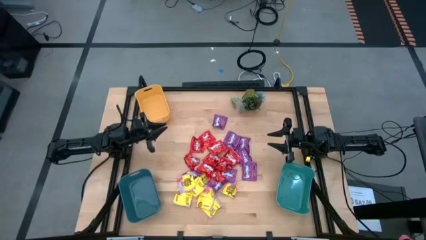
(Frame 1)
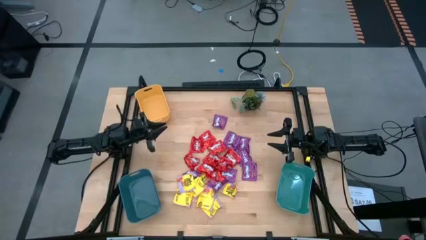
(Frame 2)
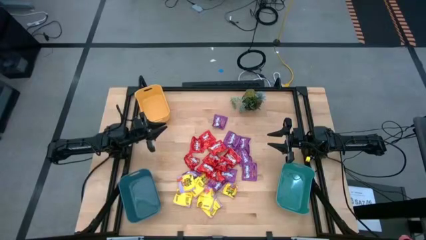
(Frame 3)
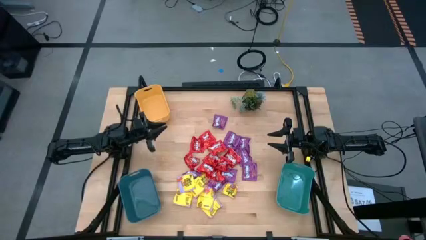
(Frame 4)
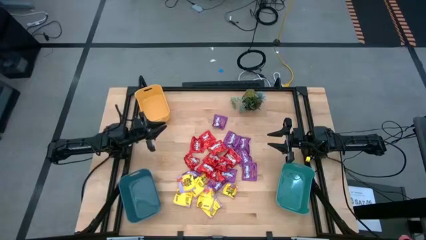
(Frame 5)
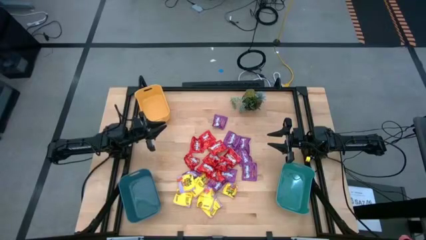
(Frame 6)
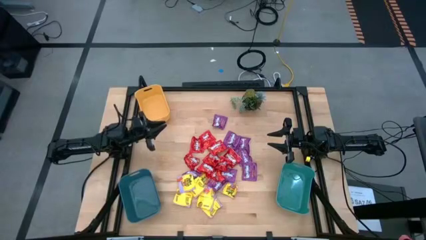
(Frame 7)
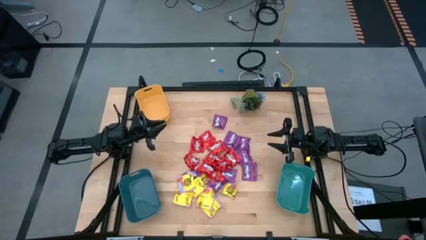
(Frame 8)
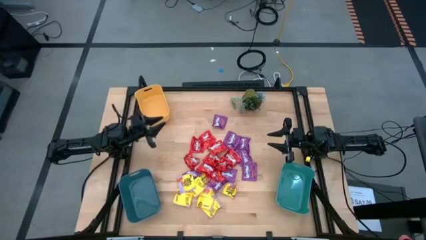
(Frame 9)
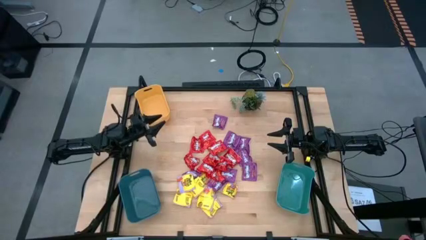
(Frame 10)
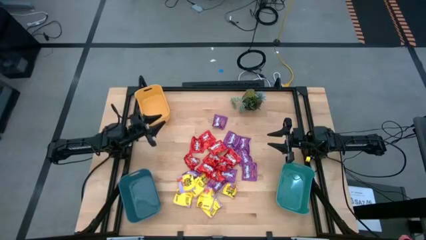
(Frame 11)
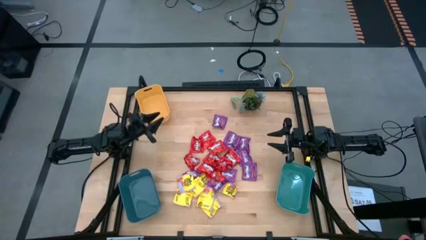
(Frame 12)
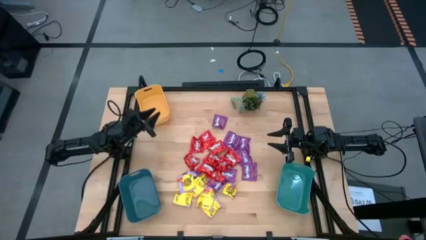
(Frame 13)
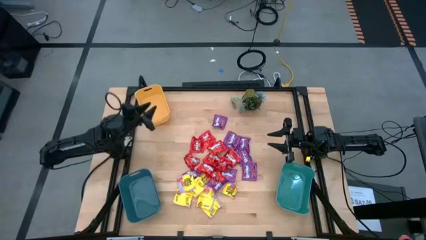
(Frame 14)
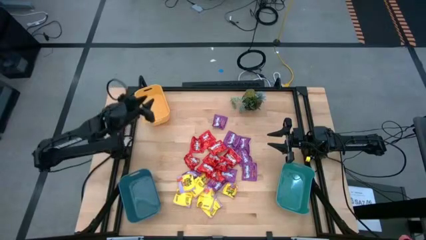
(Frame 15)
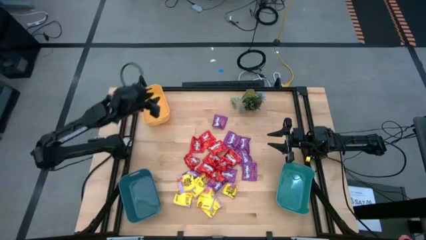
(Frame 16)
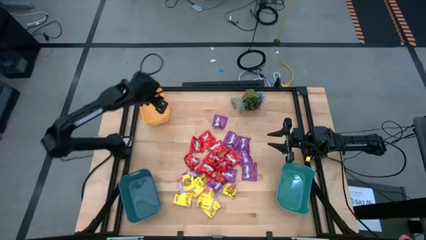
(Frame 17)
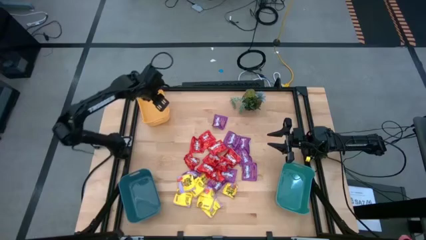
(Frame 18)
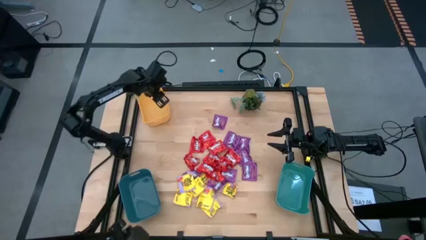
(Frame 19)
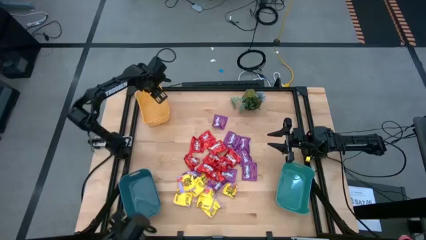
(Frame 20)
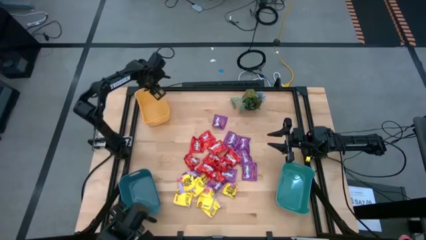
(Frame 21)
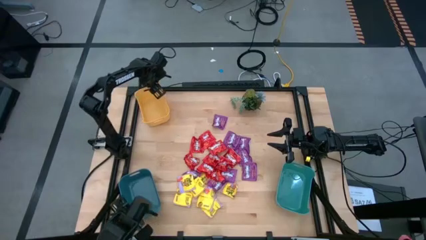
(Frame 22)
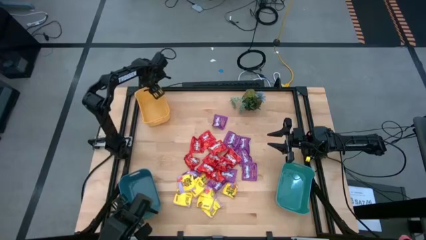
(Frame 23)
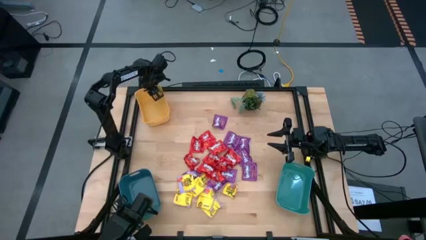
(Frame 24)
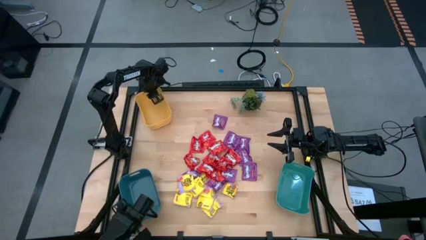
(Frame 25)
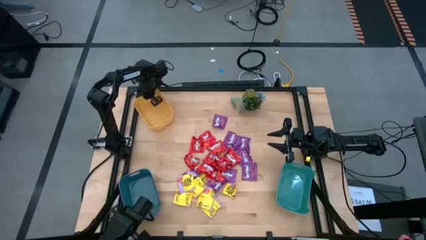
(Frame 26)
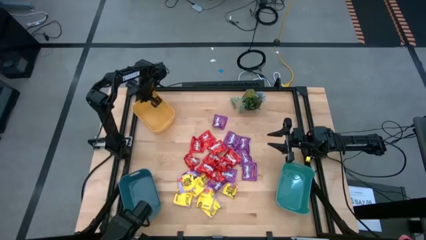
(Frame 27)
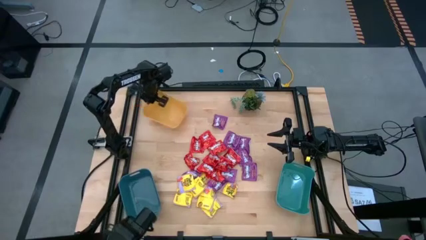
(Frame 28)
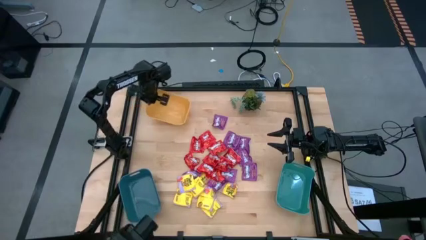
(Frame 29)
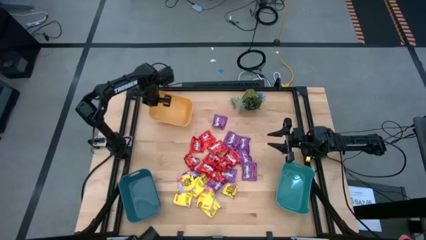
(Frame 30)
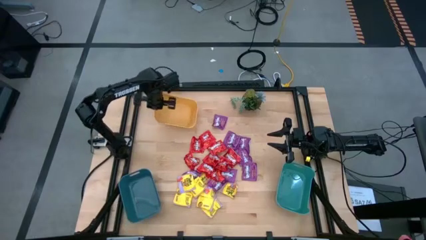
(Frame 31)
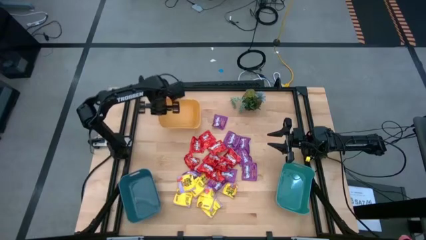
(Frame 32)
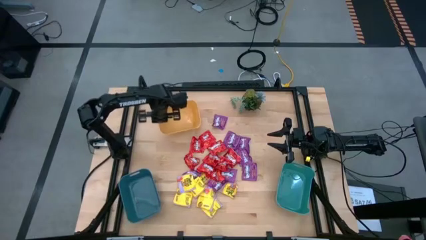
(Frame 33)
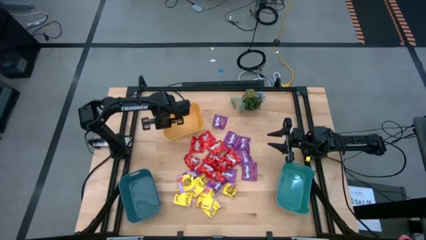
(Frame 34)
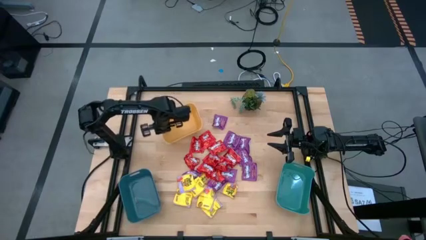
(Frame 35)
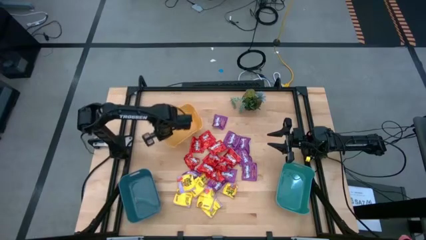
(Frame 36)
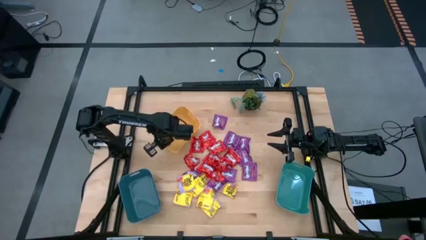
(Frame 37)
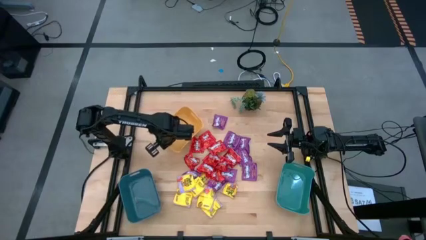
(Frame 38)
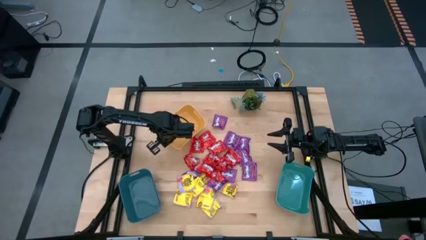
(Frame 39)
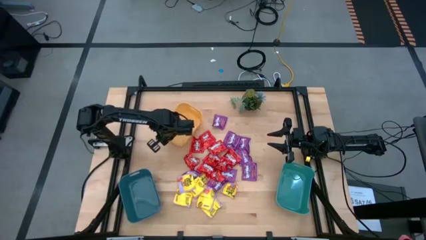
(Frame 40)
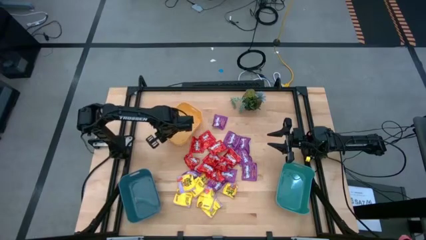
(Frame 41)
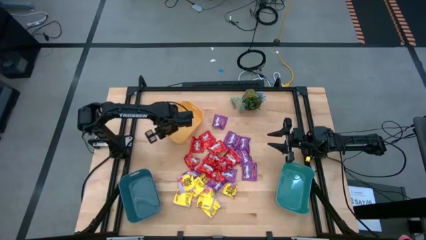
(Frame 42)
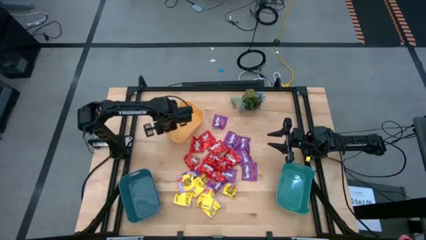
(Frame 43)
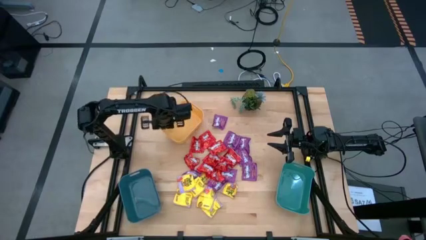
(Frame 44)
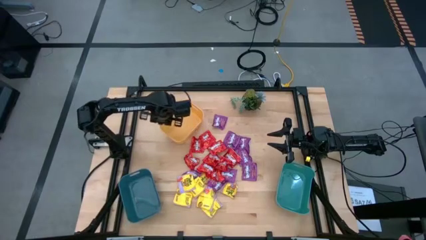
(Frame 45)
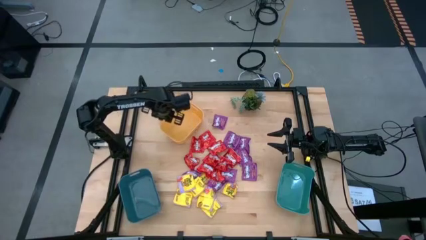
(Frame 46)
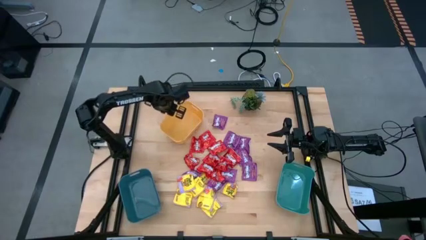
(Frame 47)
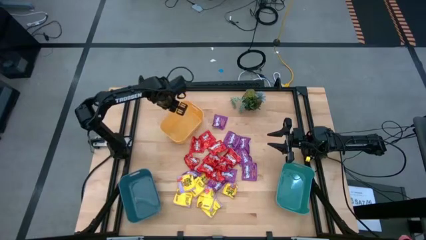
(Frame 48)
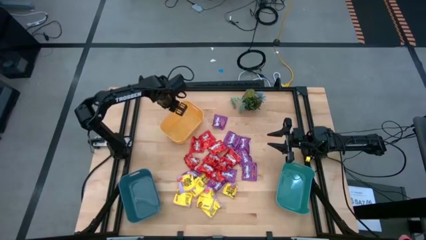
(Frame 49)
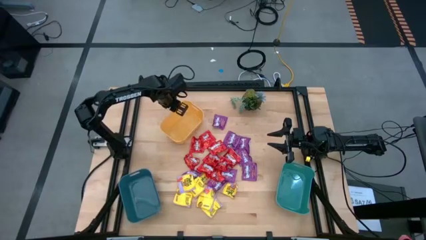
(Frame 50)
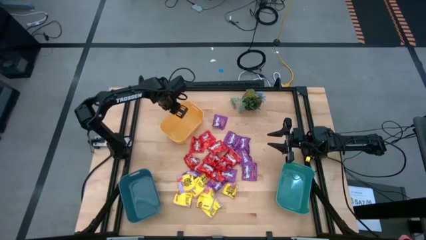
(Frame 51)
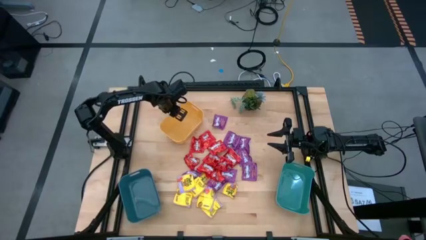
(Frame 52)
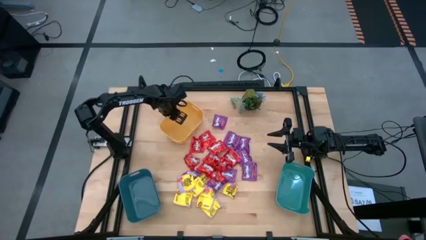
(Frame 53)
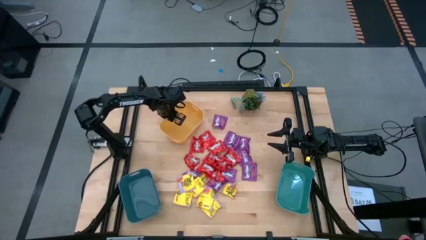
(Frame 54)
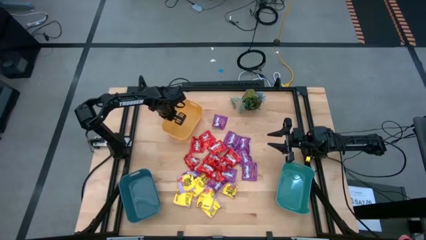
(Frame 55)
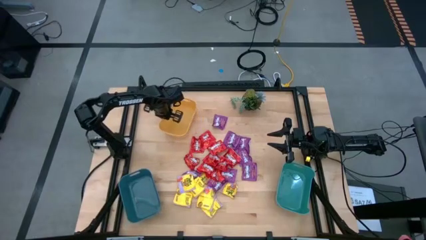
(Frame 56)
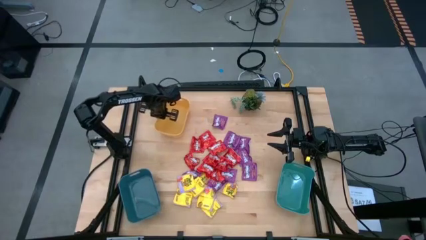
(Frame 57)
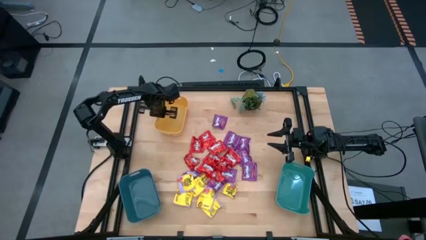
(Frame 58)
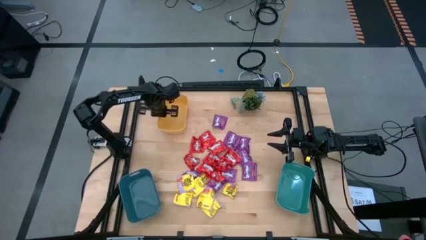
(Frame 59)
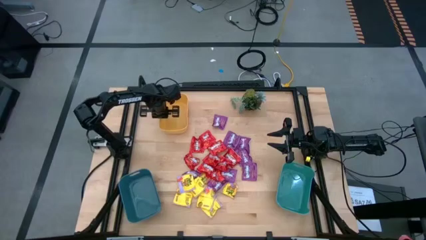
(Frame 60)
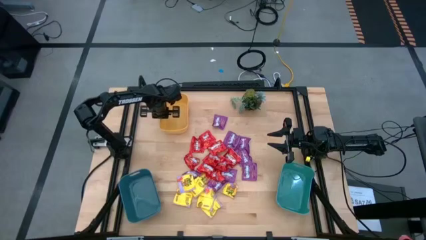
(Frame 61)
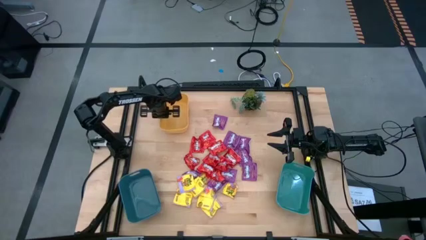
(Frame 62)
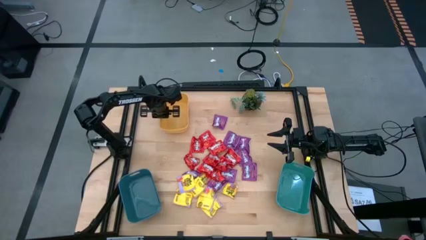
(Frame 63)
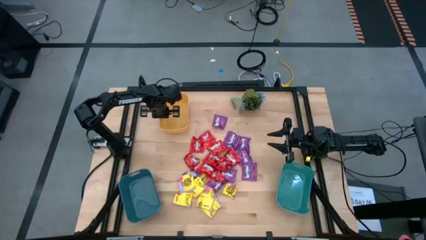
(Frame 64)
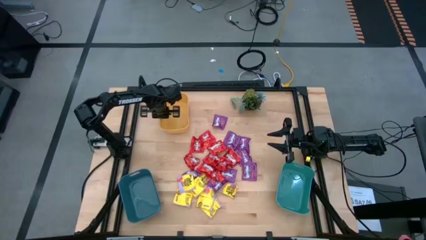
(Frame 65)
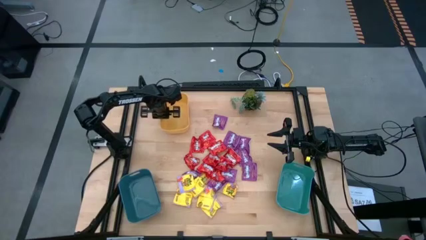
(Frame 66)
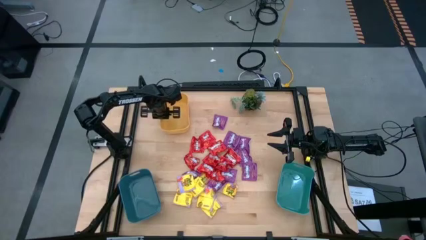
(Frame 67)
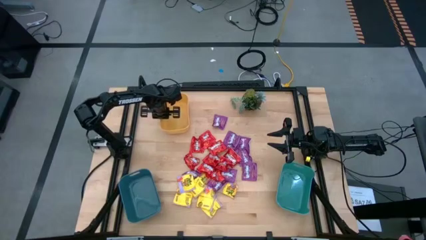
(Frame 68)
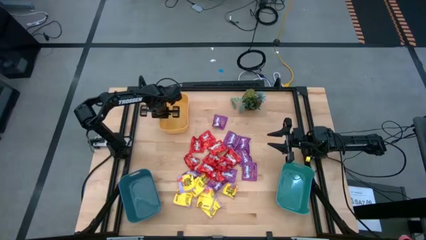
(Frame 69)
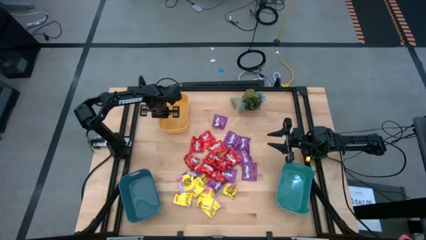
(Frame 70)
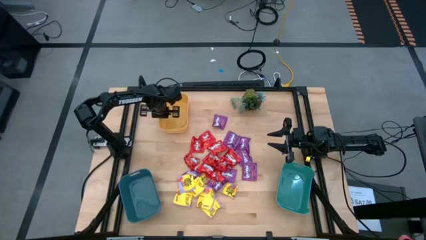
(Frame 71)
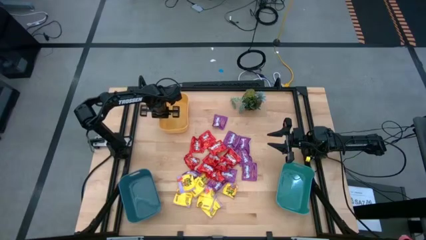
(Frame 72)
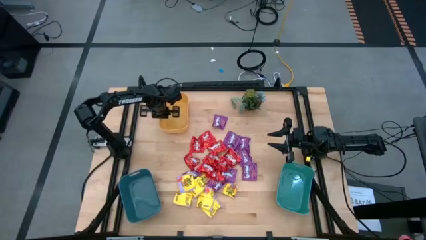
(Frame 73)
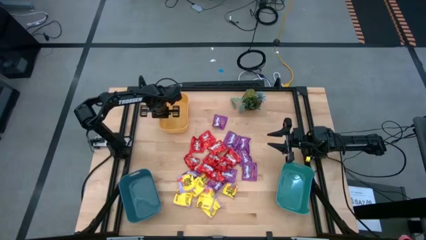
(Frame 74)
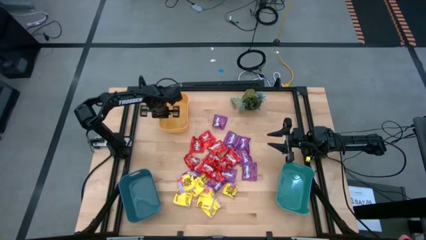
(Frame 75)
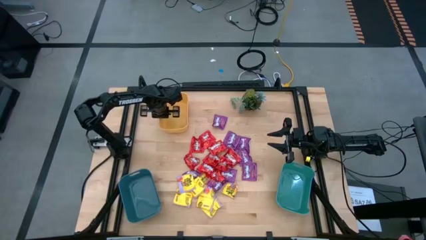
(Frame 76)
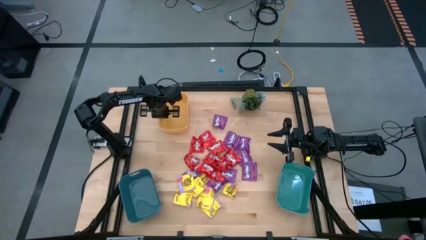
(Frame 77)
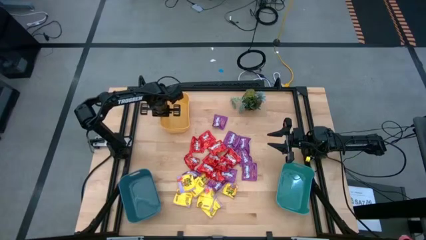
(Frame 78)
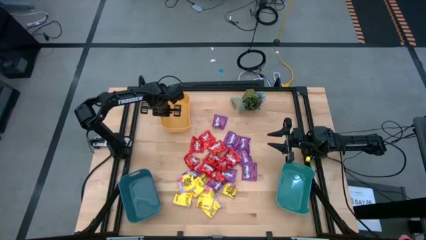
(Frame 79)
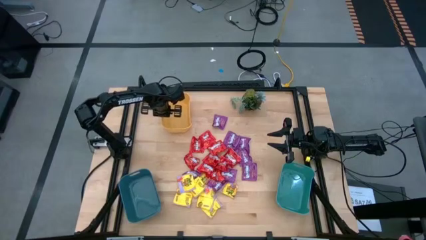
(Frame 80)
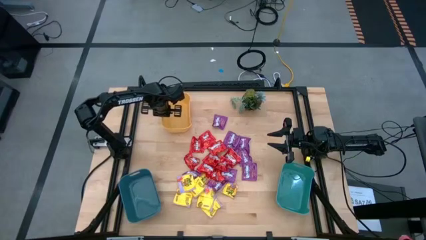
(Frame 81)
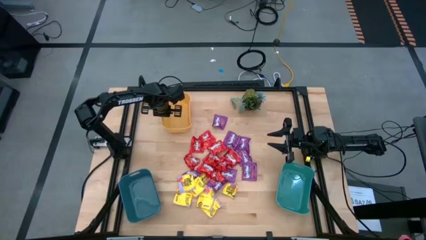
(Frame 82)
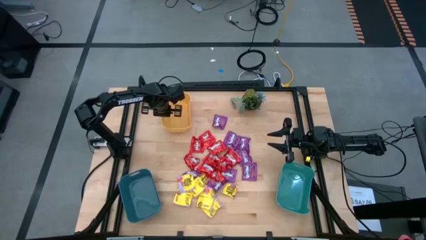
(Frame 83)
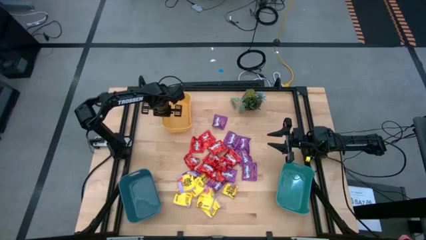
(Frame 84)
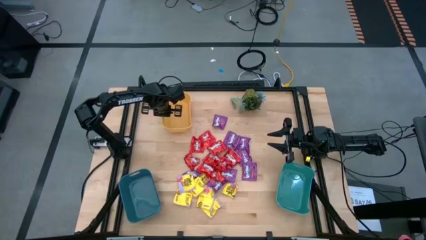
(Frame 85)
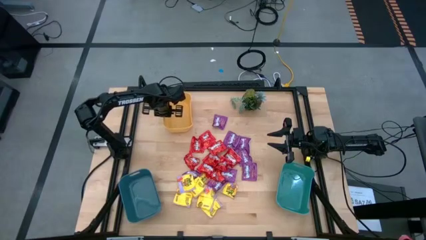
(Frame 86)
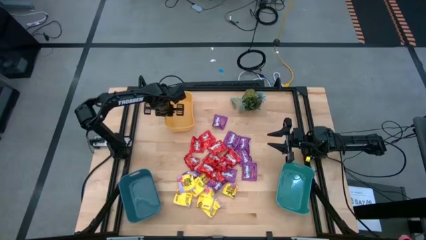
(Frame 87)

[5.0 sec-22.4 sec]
Task: Sort candy
Adjust the yellow bin
